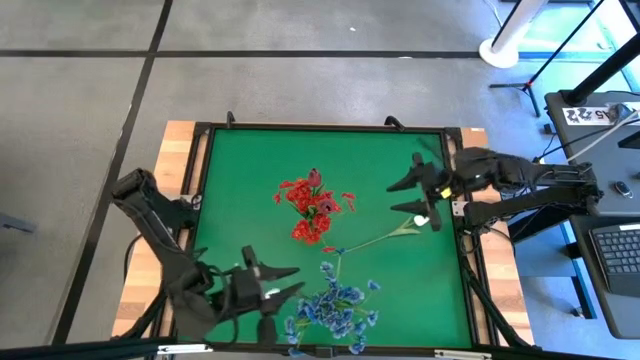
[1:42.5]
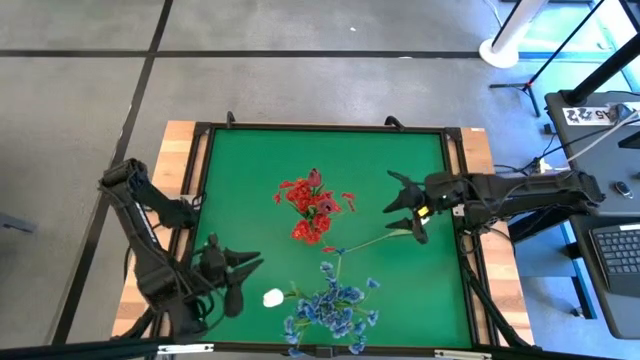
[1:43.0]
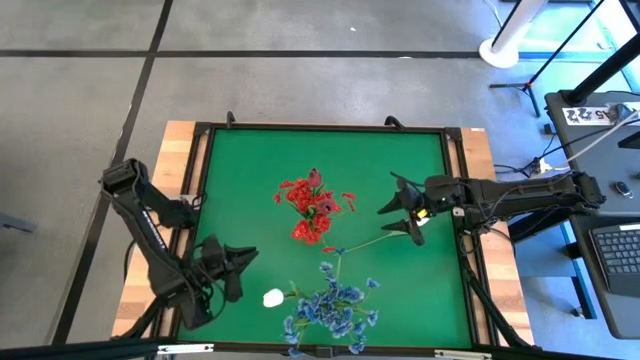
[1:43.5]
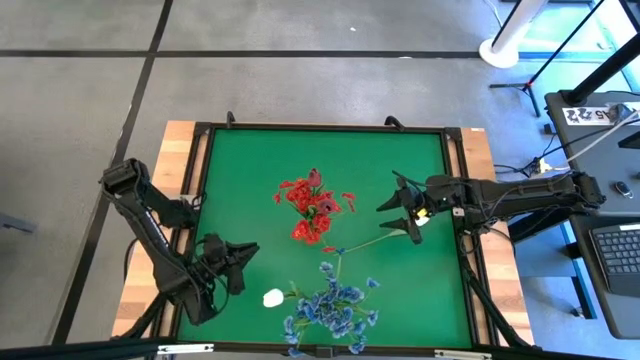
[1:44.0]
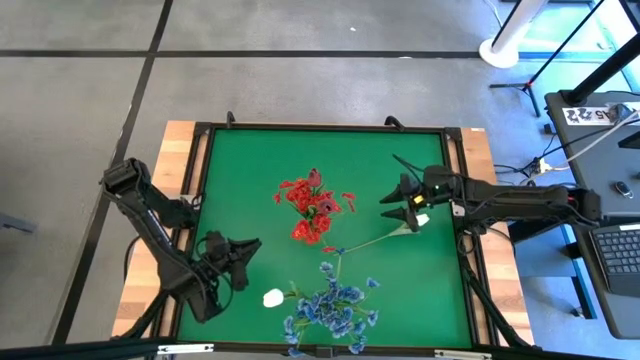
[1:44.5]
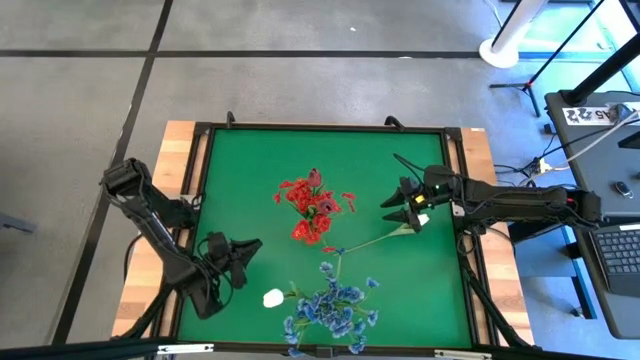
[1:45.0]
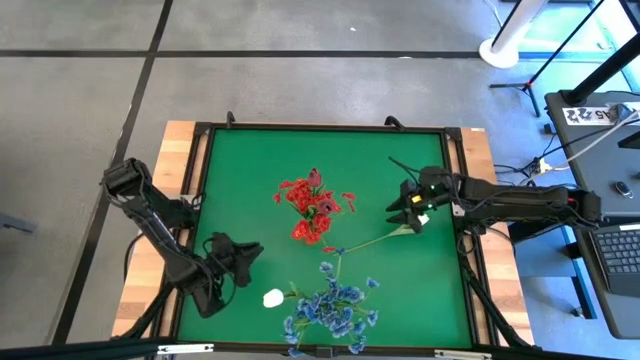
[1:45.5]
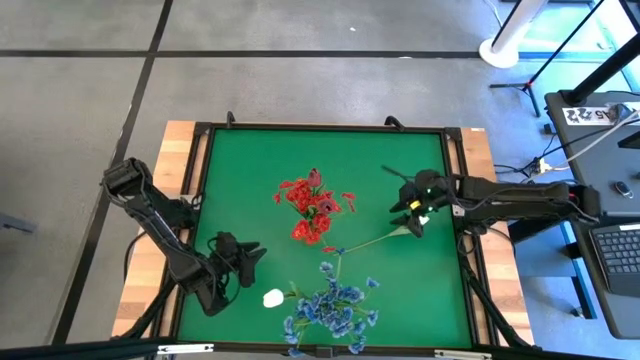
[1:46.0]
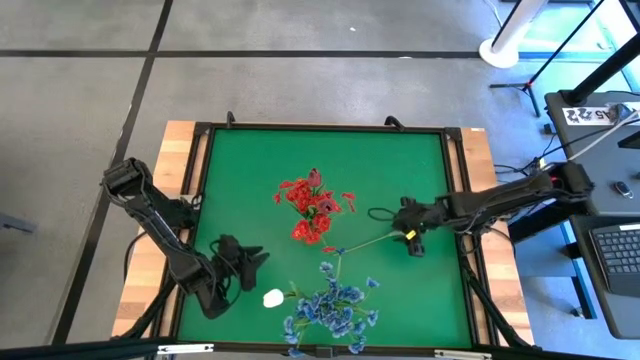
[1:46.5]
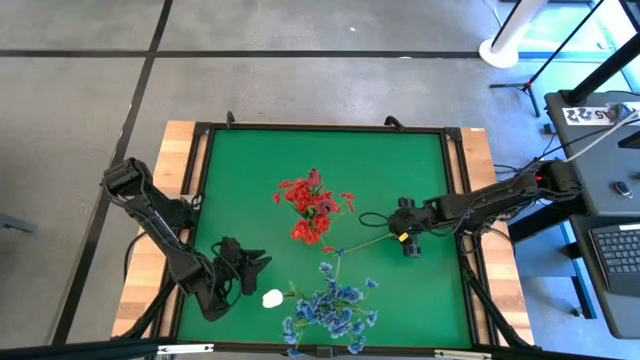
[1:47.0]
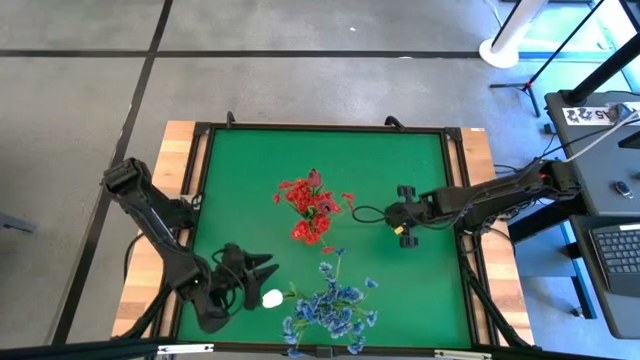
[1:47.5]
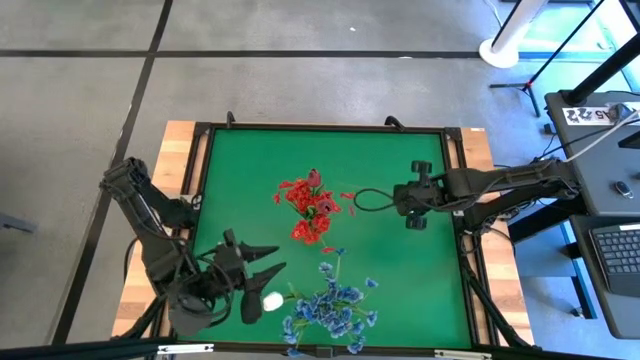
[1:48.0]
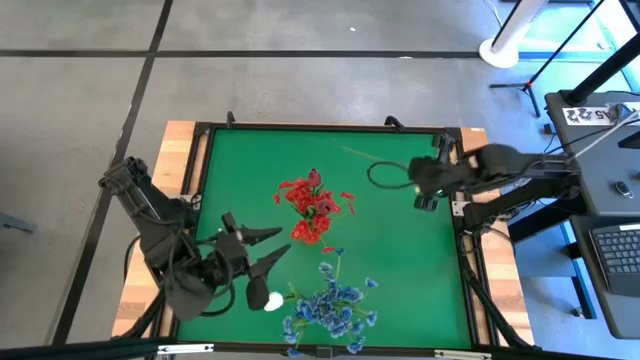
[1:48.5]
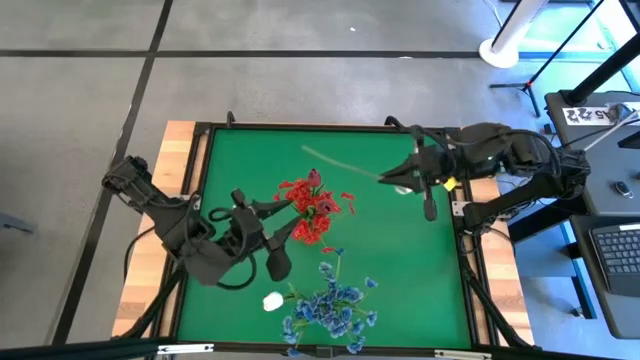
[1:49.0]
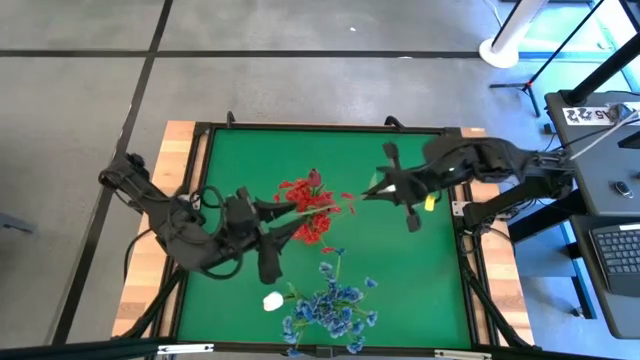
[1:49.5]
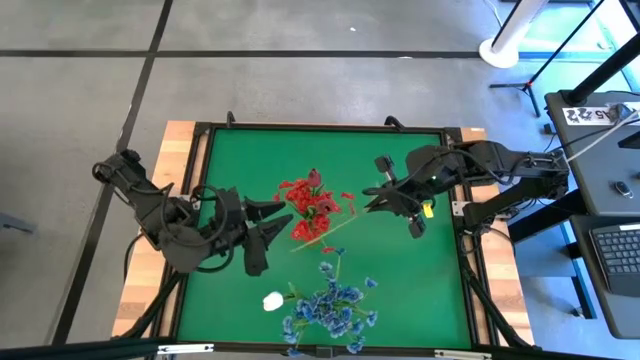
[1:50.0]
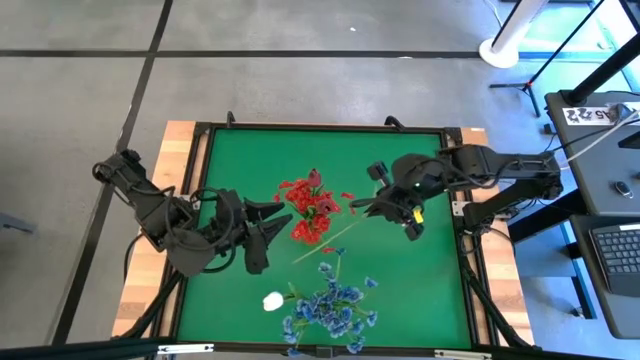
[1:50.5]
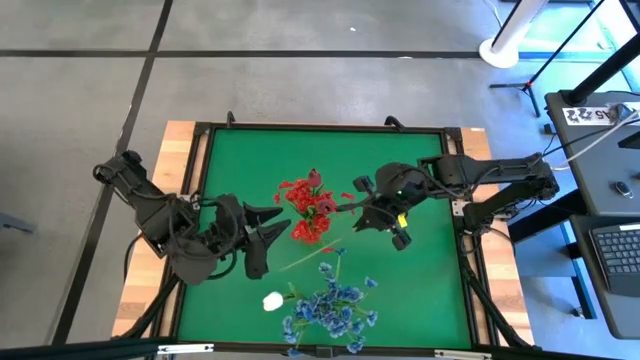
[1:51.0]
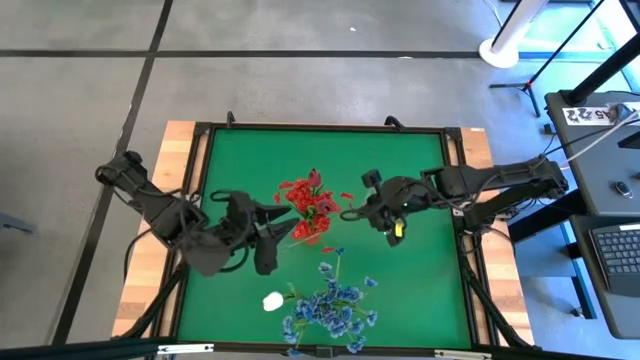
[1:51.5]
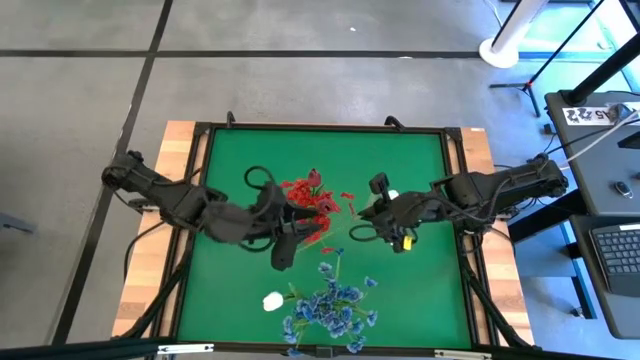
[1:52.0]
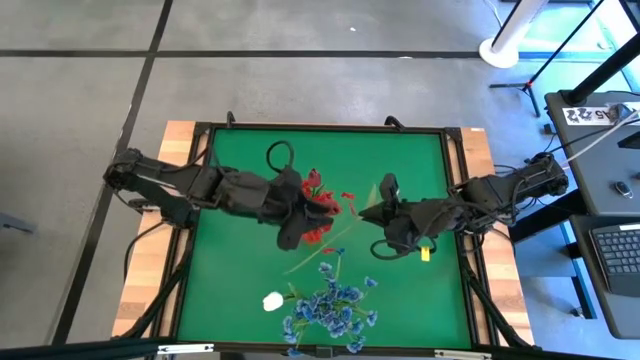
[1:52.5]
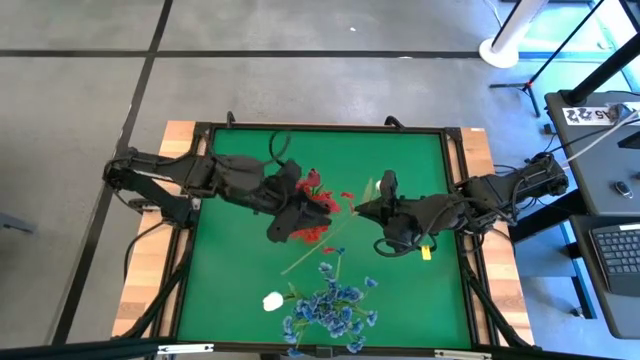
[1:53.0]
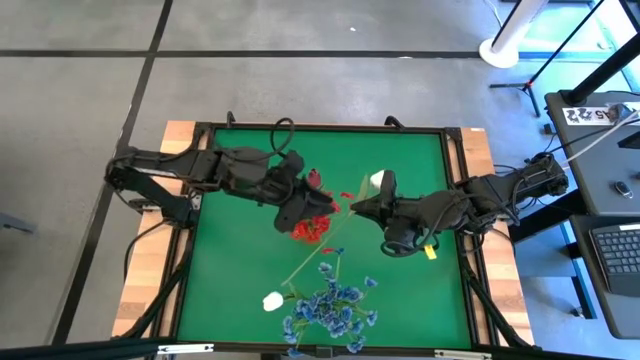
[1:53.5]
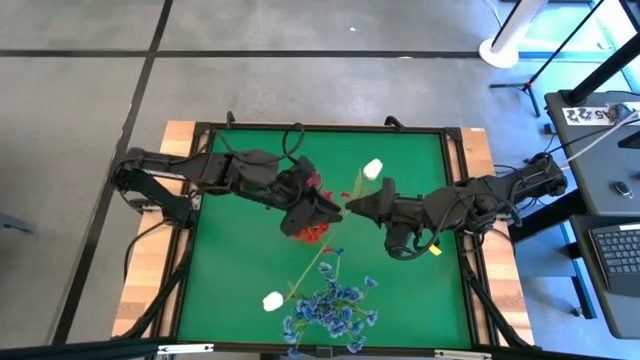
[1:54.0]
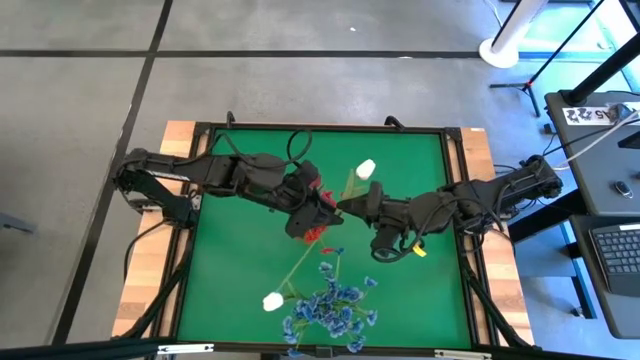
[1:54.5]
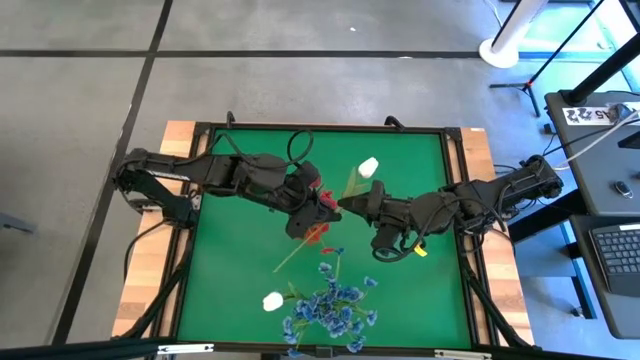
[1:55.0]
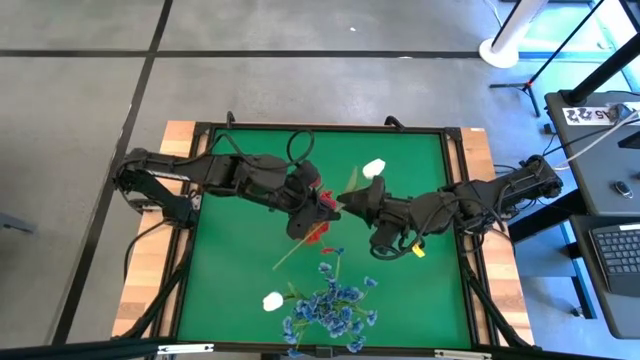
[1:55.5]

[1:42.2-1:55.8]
Task: Sort flowers into vase by color
Put the white tulip into the transparent vase

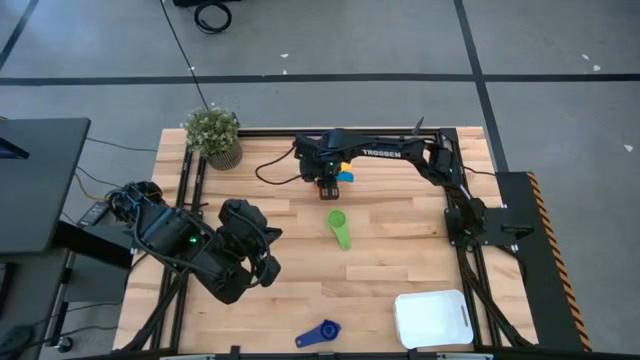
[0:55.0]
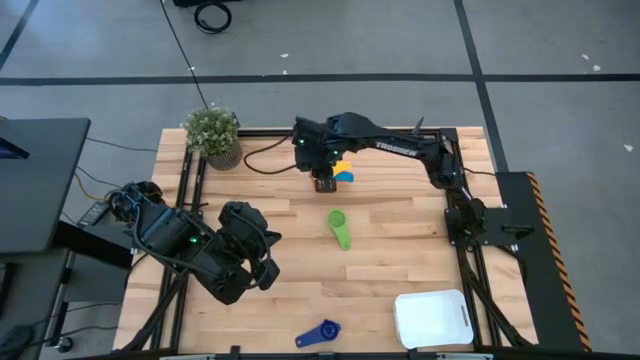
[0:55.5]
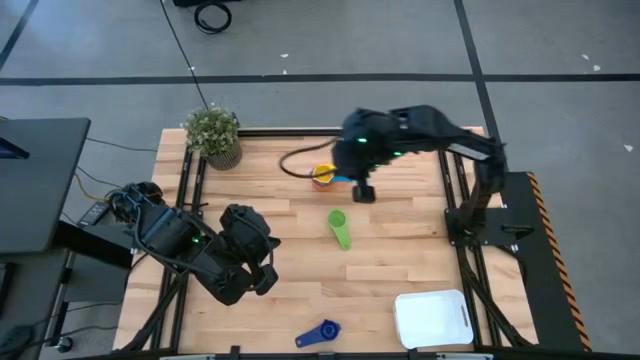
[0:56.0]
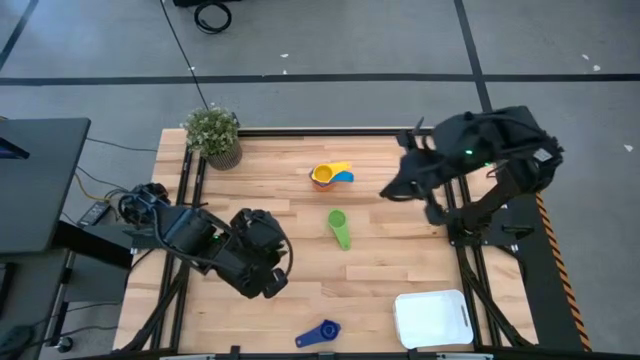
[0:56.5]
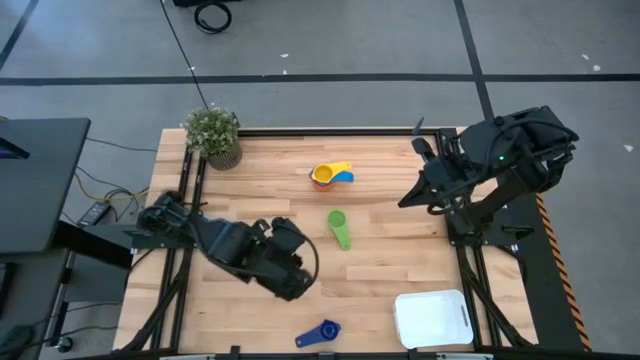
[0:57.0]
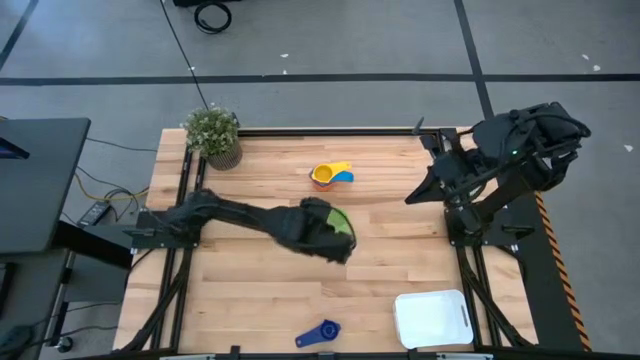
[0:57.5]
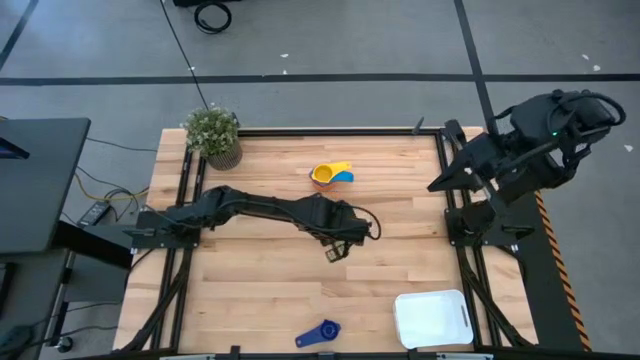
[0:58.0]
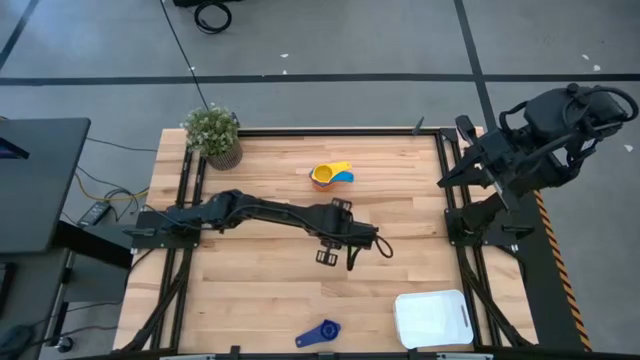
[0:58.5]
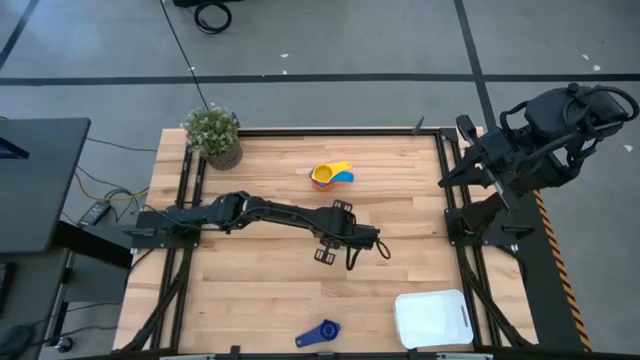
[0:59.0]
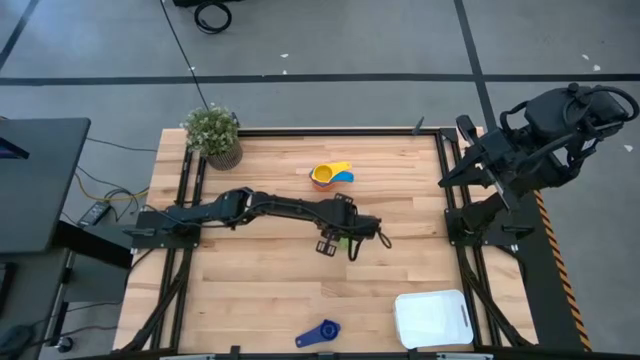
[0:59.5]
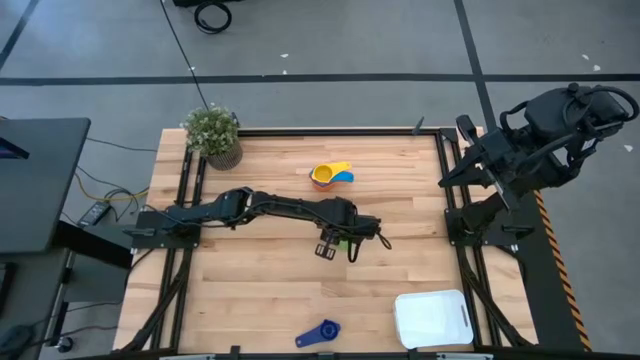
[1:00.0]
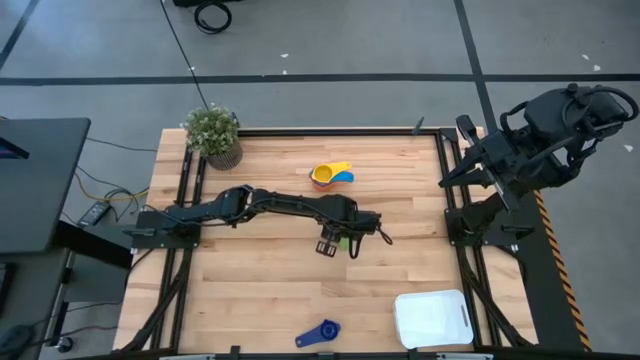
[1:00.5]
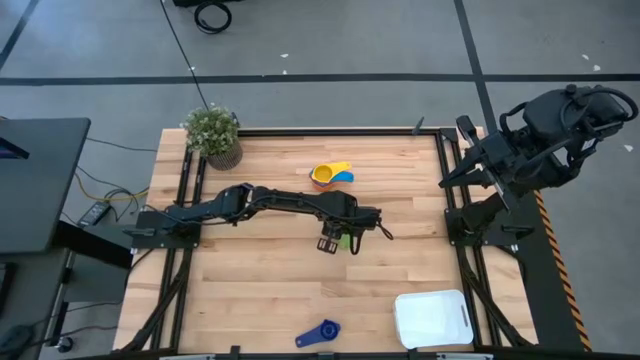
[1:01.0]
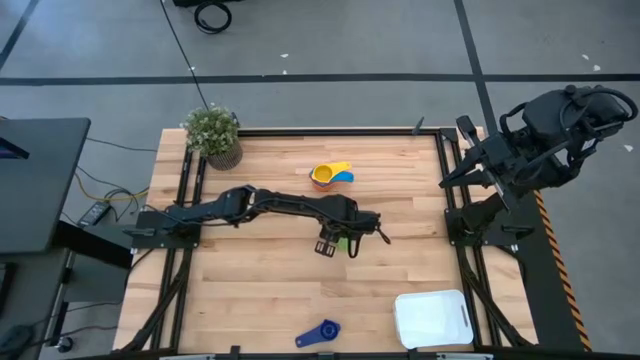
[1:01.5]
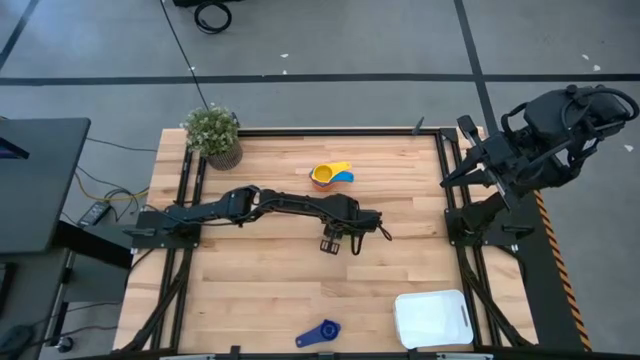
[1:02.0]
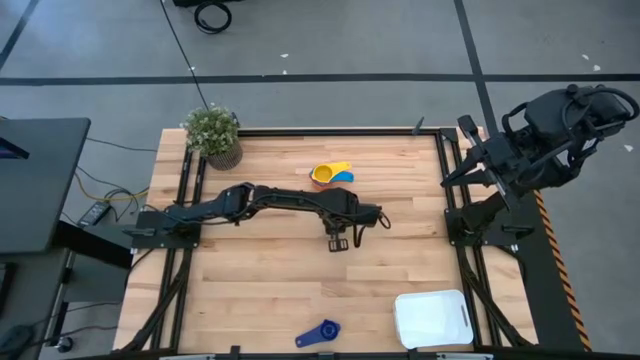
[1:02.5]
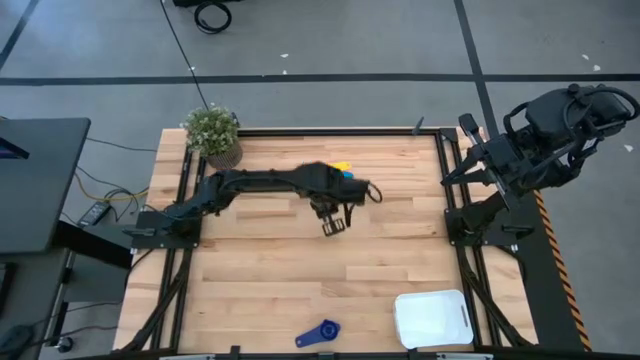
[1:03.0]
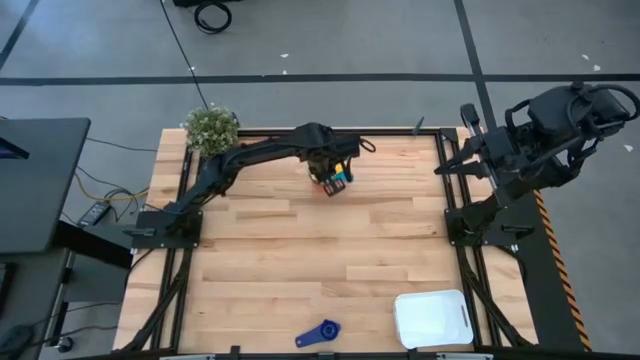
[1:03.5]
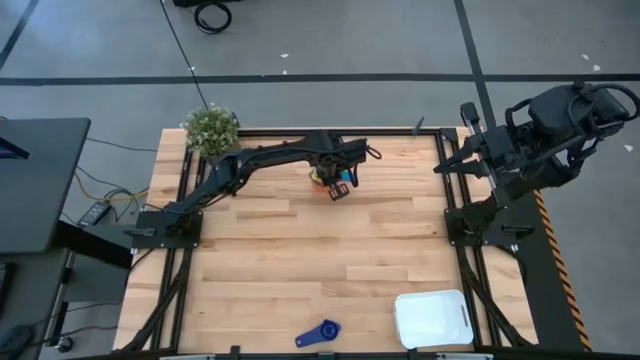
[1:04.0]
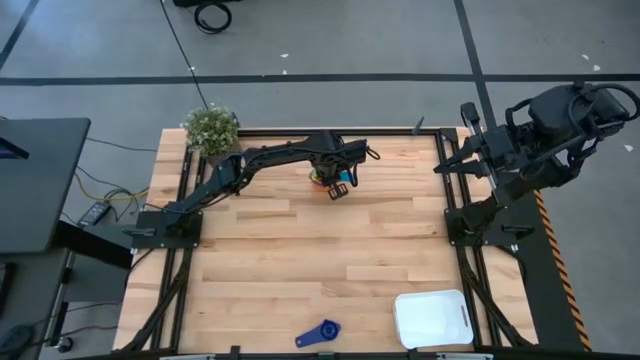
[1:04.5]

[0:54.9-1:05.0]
Task: Nest measuring cups in basket
Stack the green measuring cup on top of the yellow measuring cup
